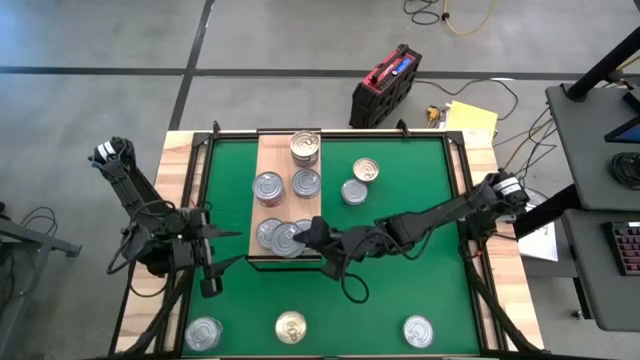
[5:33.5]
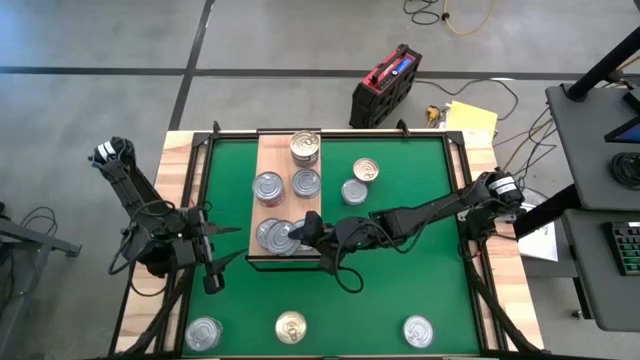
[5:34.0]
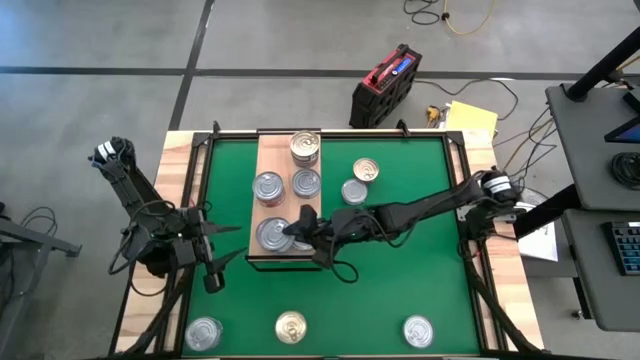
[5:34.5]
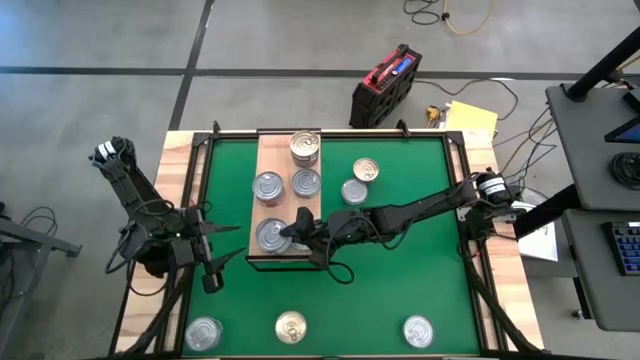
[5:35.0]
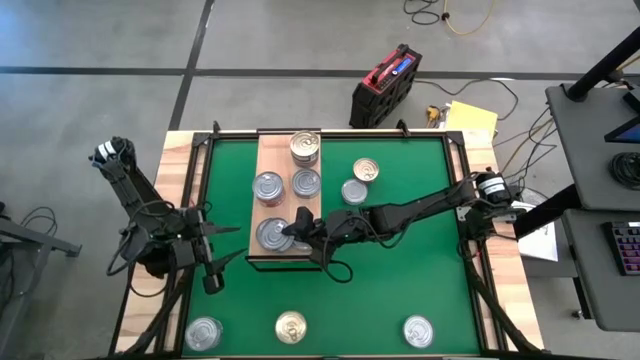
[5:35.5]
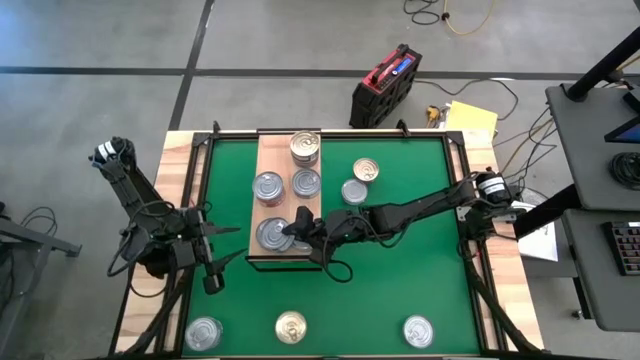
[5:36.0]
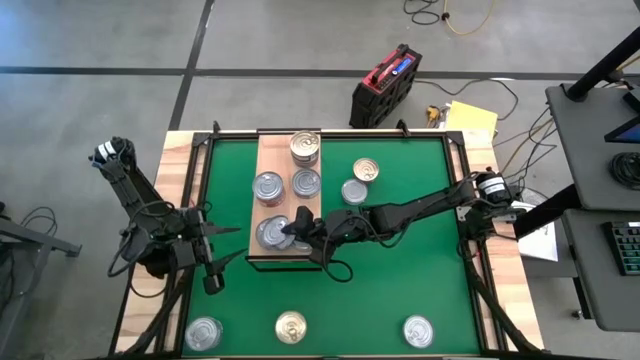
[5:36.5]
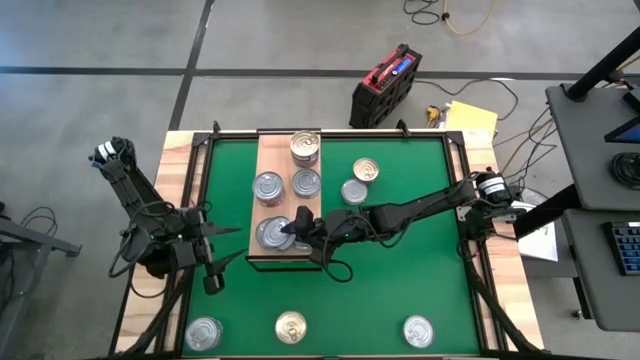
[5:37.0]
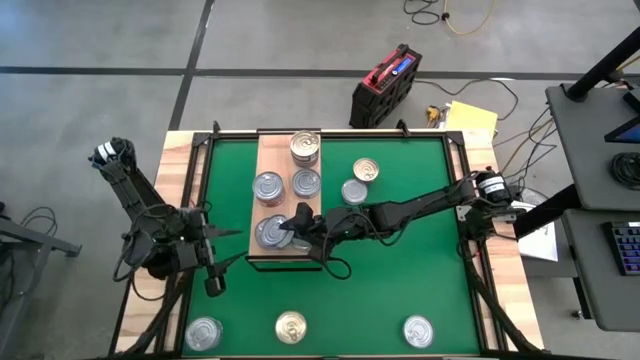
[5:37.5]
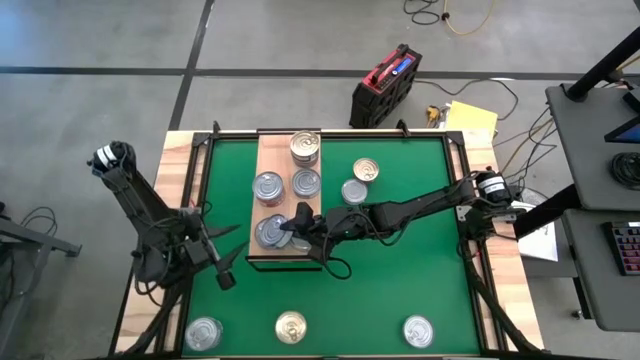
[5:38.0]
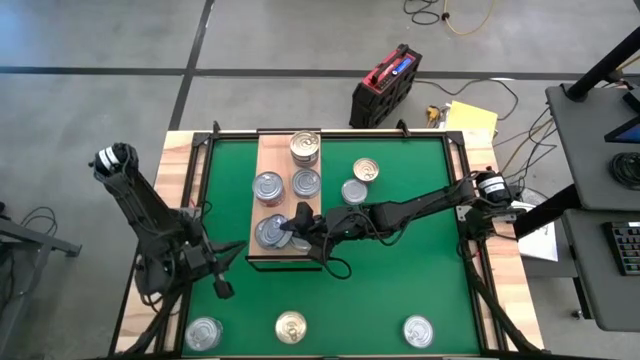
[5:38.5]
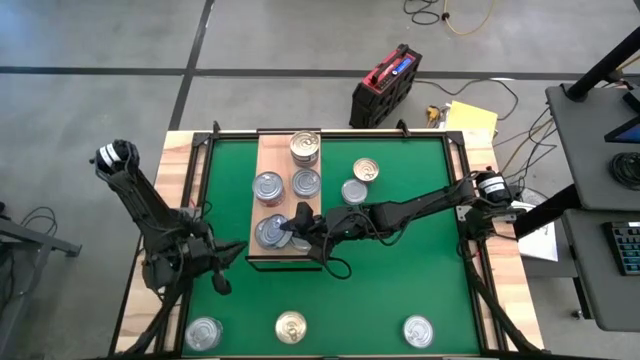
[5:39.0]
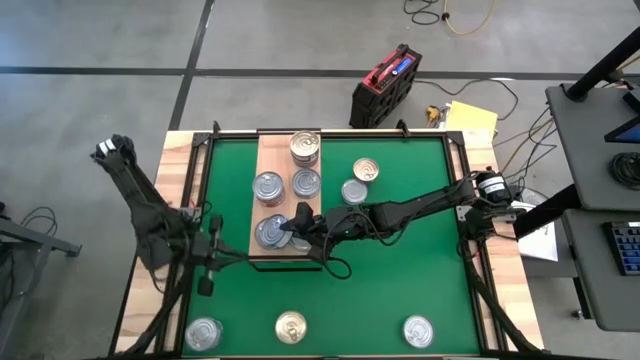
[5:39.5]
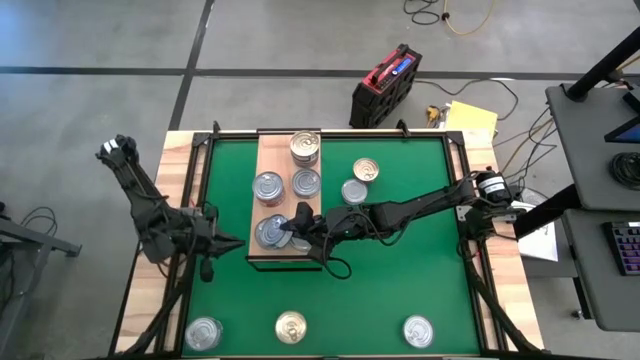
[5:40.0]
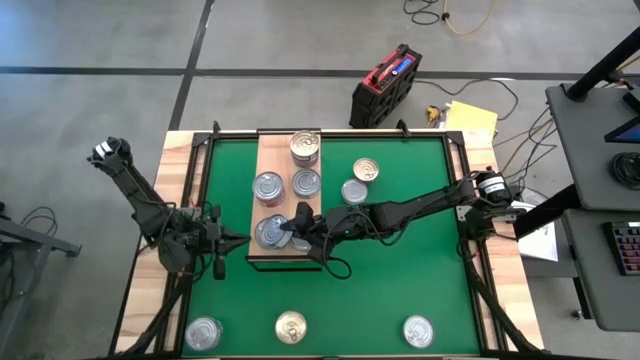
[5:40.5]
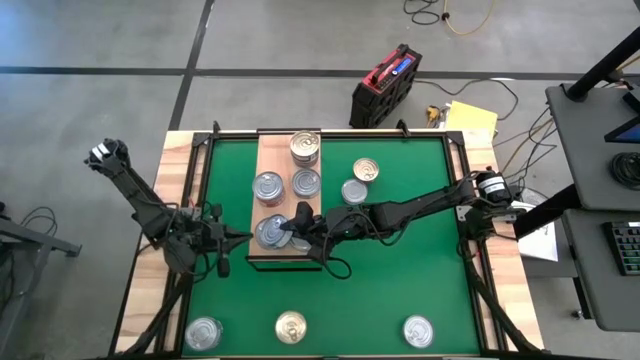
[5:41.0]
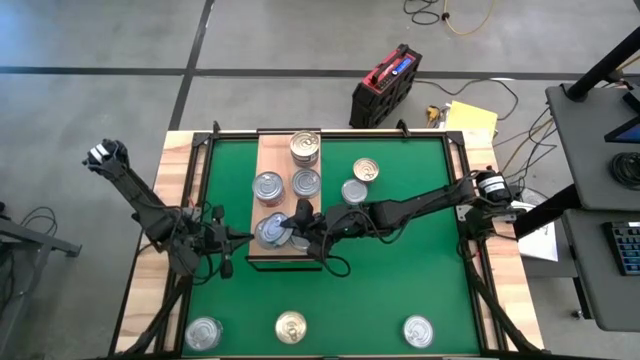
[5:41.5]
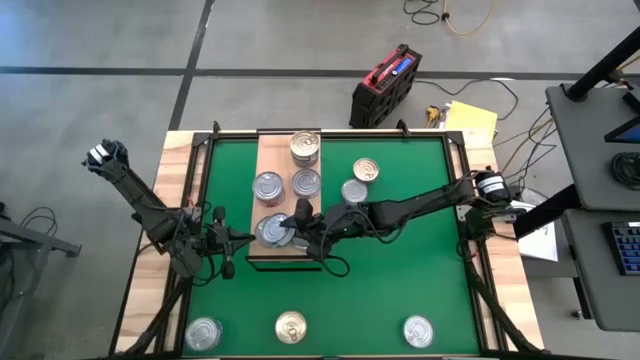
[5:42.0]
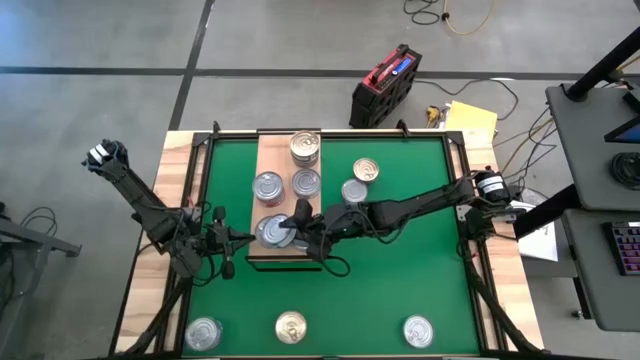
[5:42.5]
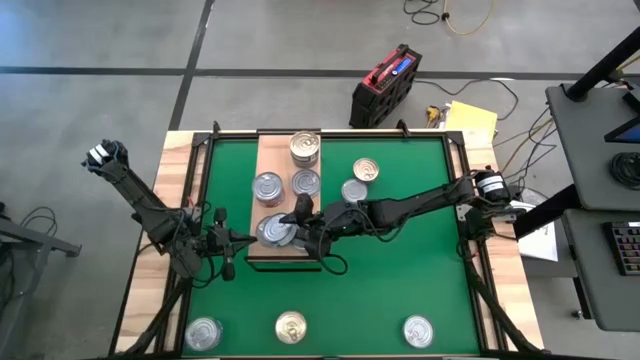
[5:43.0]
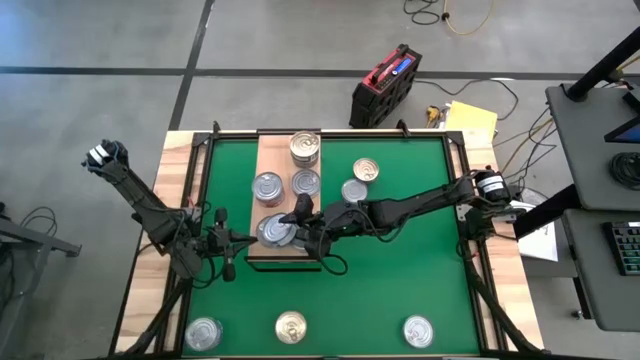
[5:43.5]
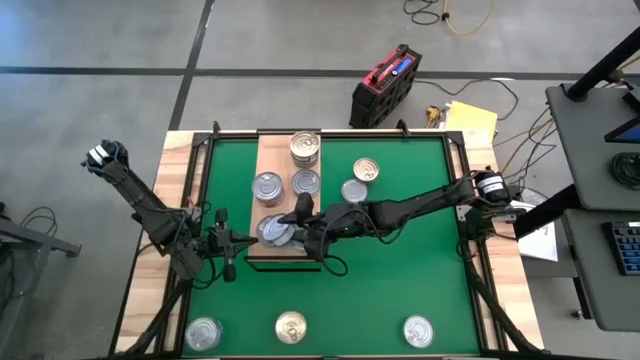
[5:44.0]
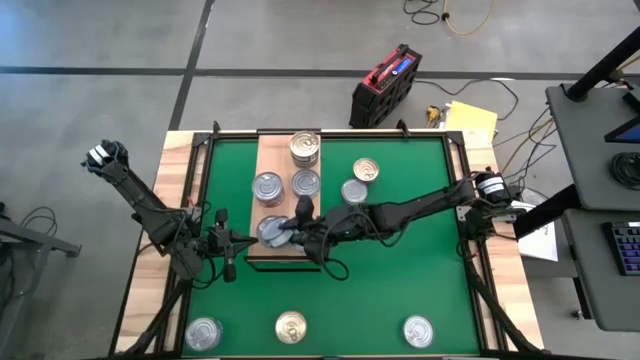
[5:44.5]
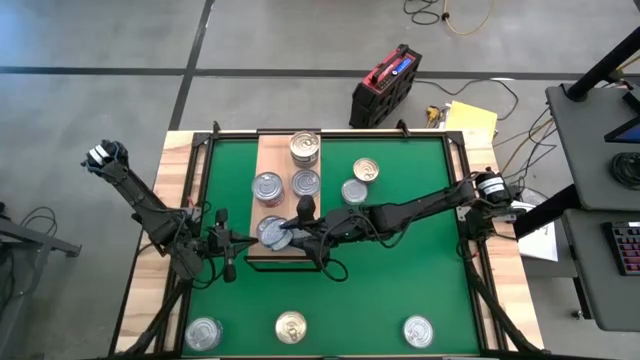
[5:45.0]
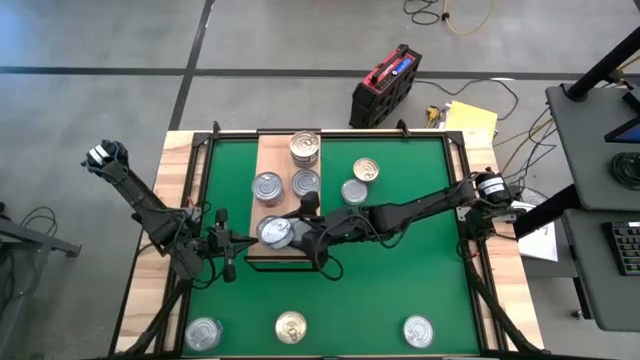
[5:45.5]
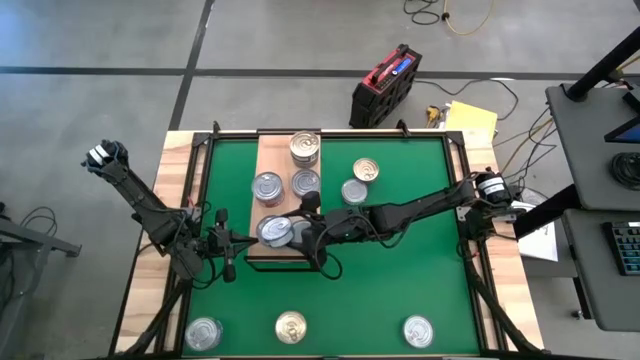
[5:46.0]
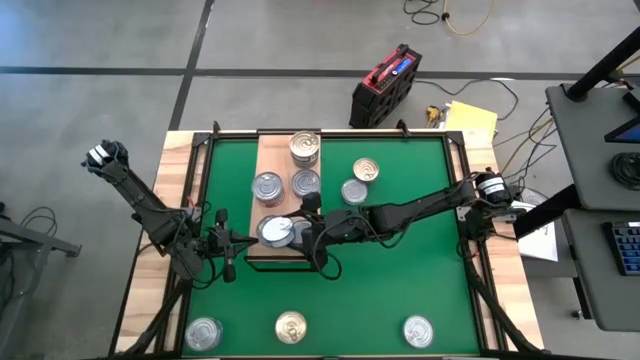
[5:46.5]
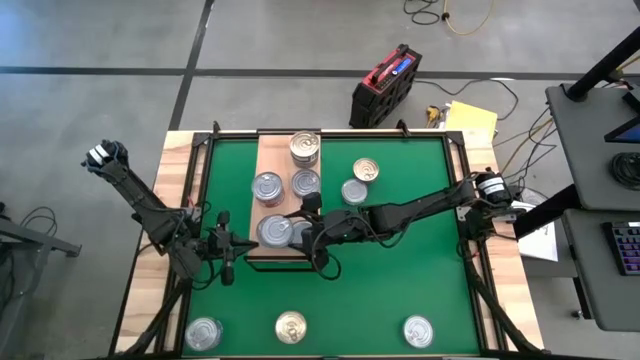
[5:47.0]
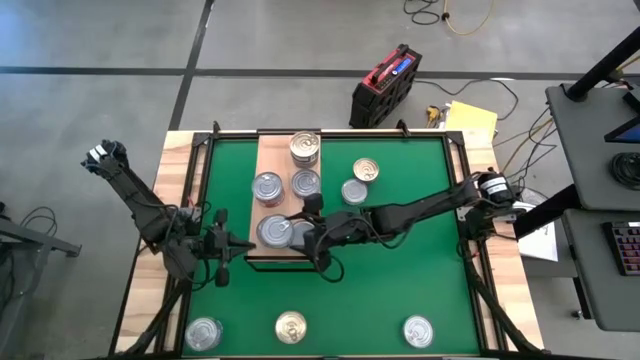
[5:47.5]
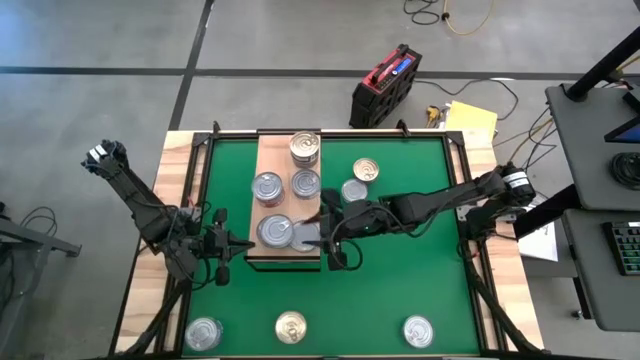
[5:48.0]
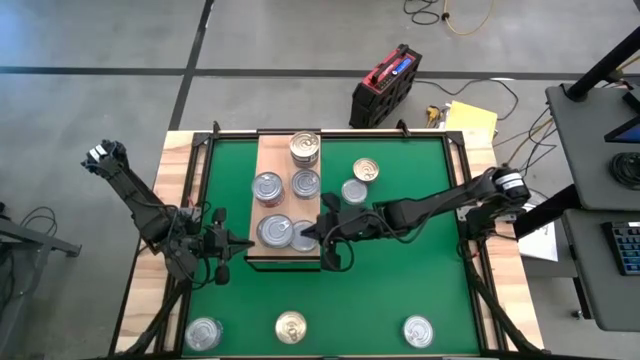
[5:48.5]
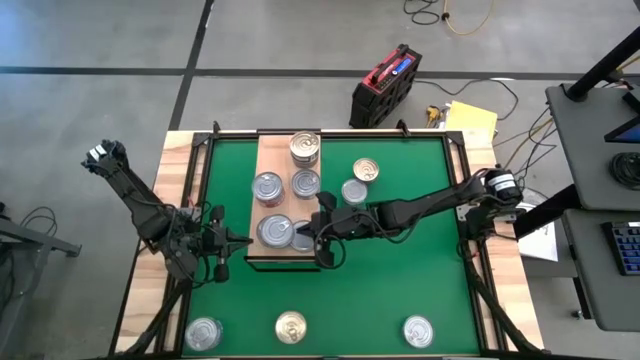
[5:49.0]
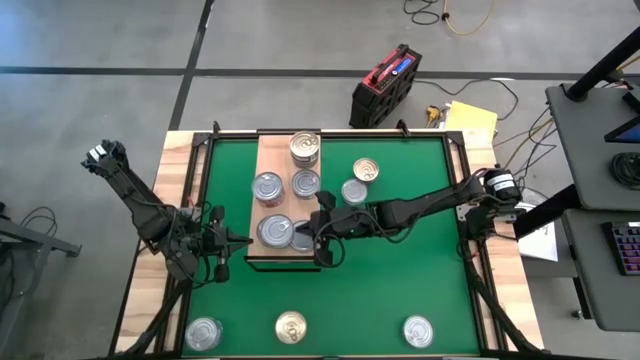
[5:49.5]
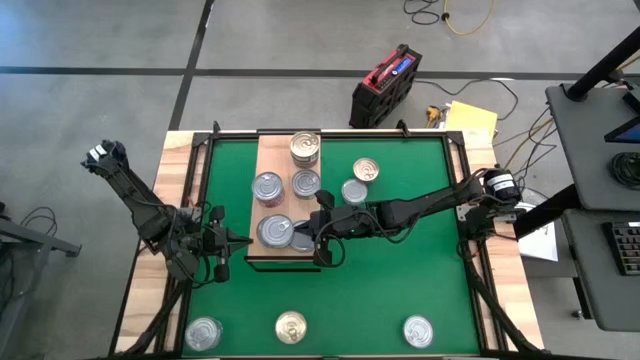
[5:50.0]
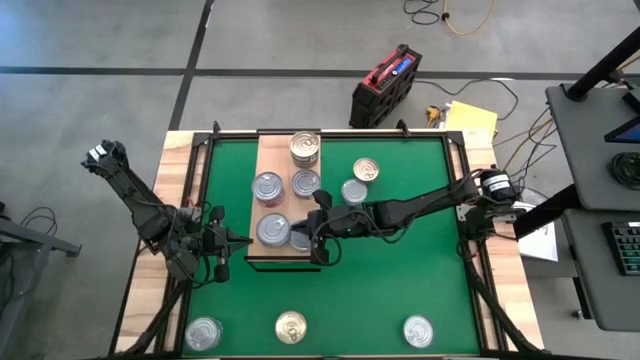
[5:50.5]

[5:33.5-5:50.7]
Task: Stack canned seafood by type on shelf
Stack the green and blue tuna can on top of the green and blue tuna can on the shelf

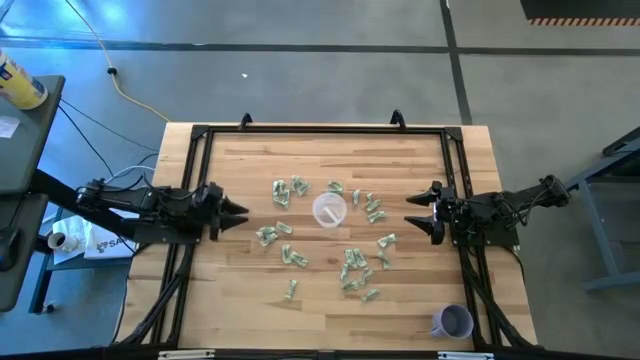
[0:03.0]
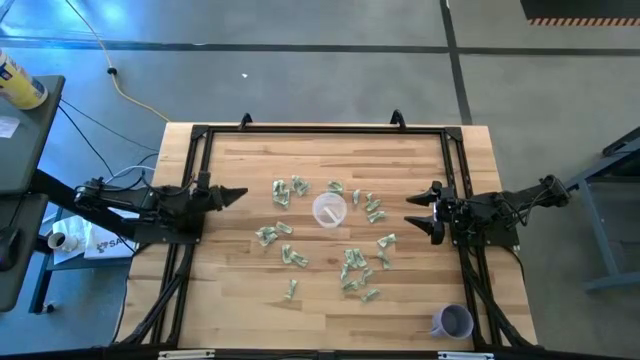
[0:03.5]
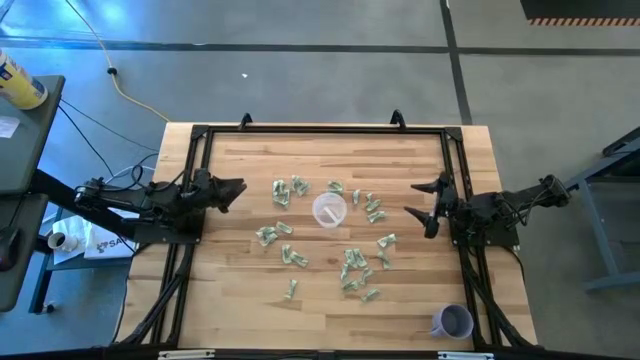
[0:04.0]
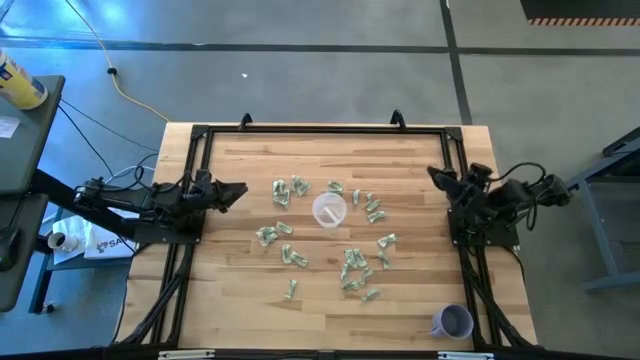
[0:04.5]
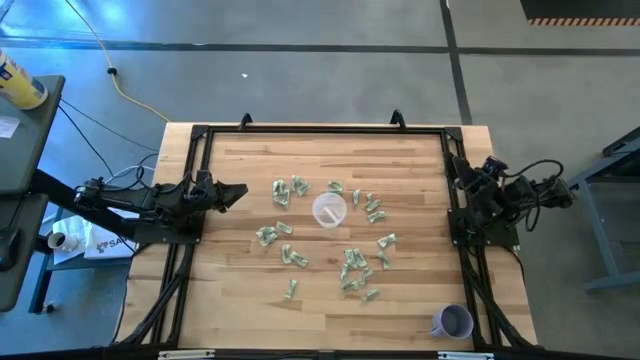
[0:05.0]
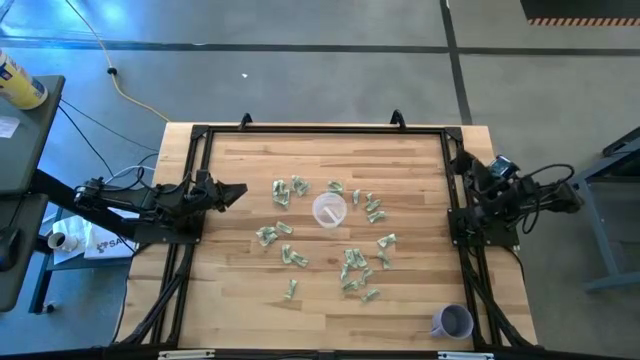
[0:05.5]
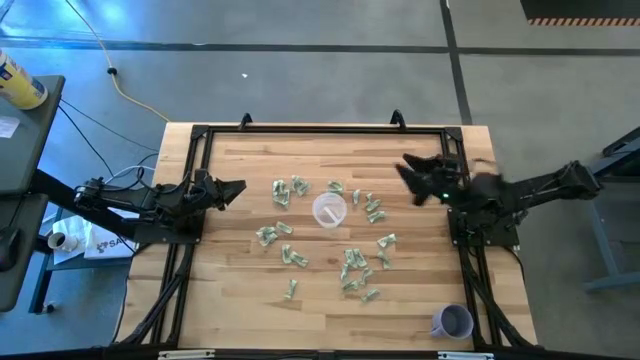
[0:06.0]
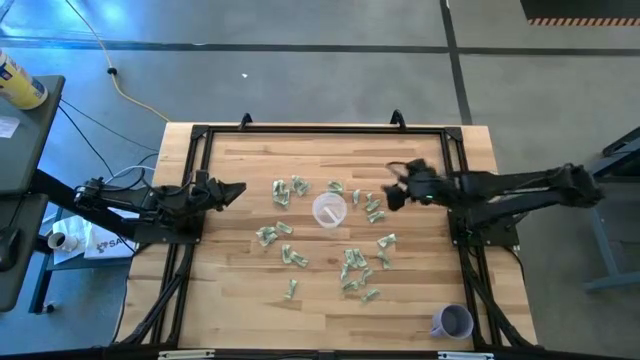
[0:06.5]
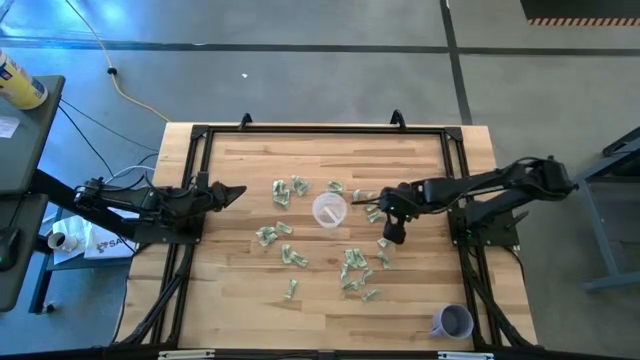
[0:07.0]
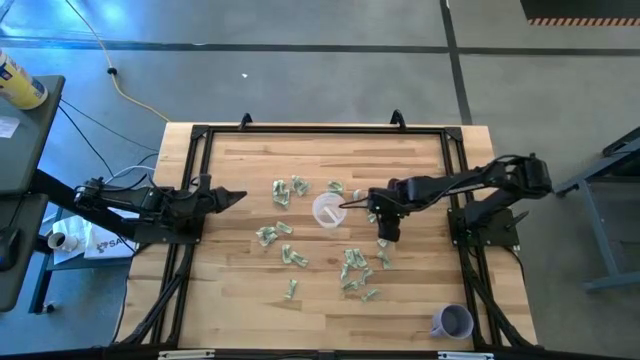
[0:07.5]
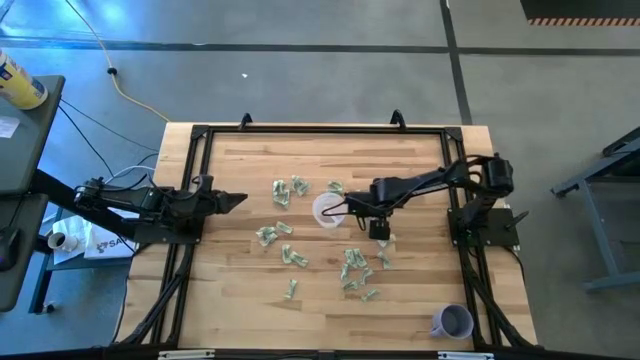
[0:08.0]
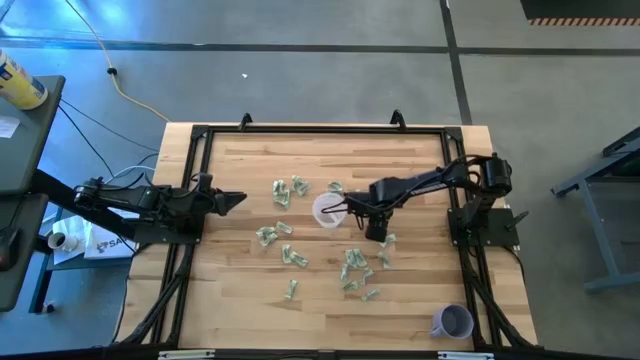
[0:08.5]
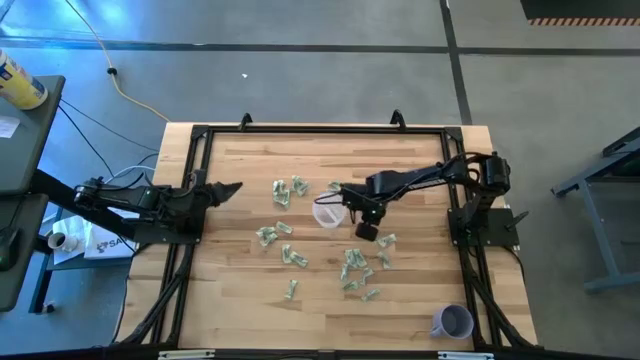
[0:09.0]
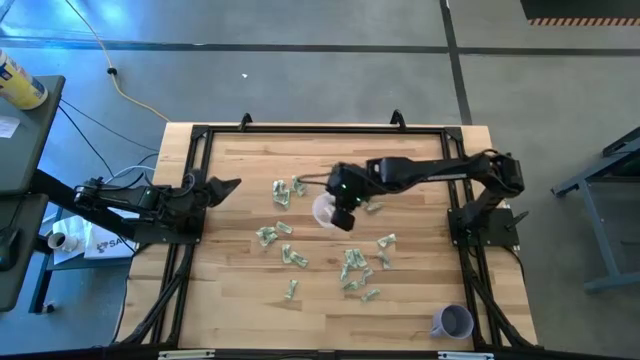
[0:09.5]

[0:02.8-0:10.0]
Task: Pick and place Stevia / Truvia into bins
Put the white stevia packet into the transparent container
